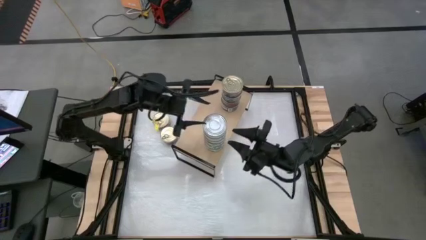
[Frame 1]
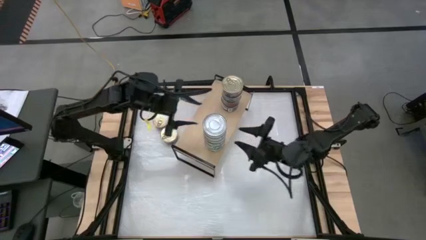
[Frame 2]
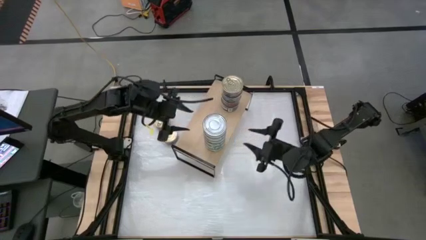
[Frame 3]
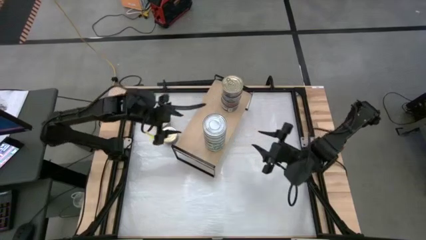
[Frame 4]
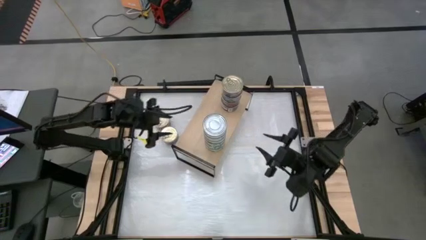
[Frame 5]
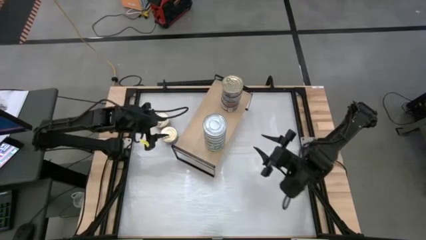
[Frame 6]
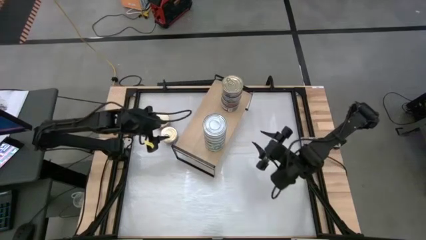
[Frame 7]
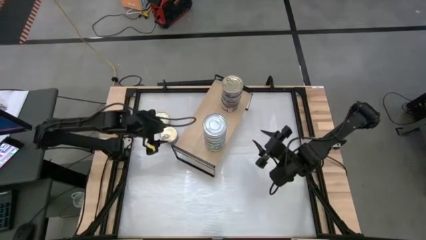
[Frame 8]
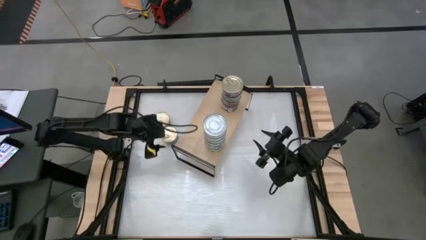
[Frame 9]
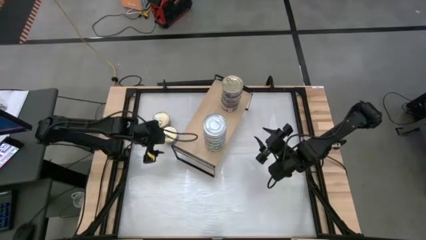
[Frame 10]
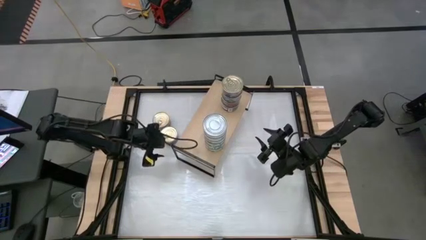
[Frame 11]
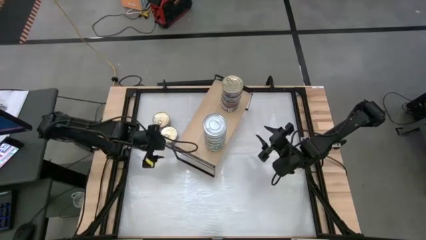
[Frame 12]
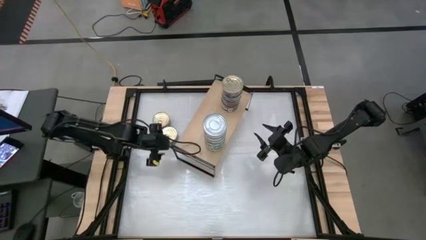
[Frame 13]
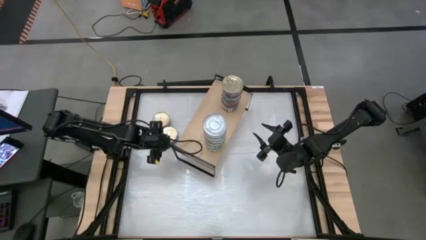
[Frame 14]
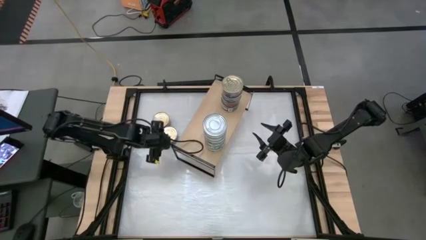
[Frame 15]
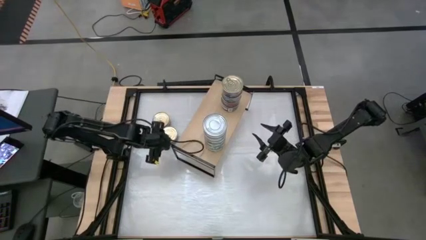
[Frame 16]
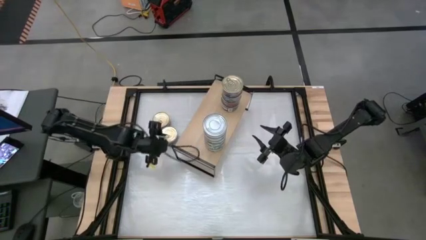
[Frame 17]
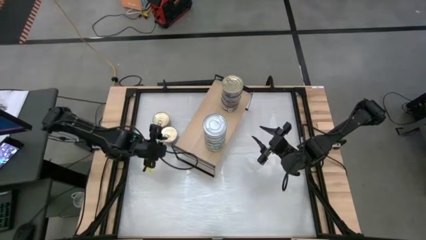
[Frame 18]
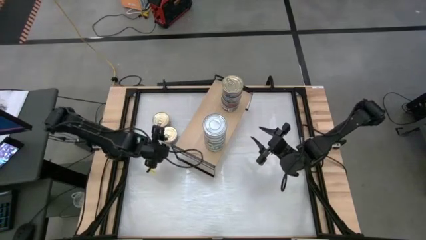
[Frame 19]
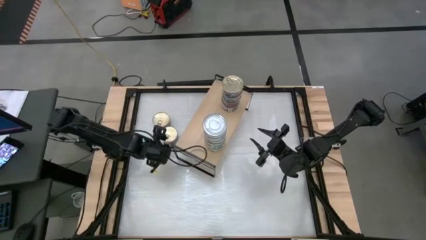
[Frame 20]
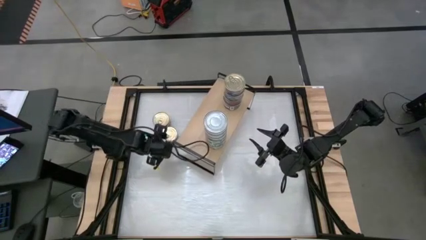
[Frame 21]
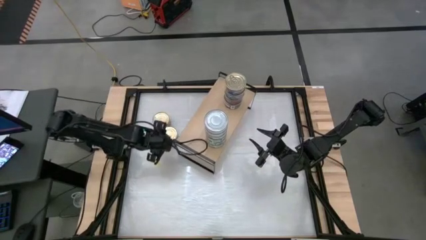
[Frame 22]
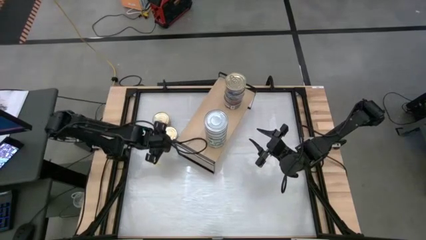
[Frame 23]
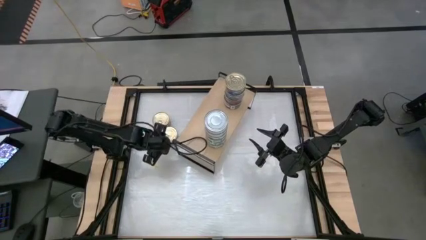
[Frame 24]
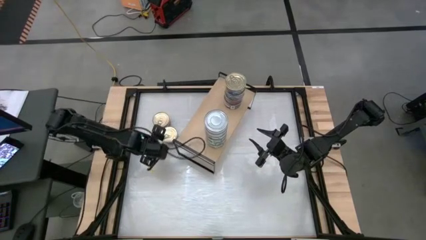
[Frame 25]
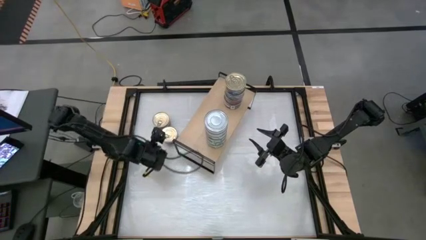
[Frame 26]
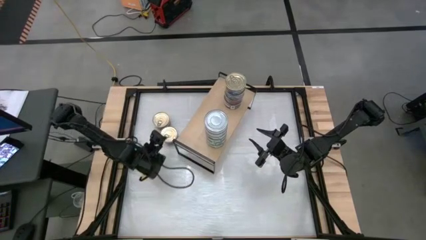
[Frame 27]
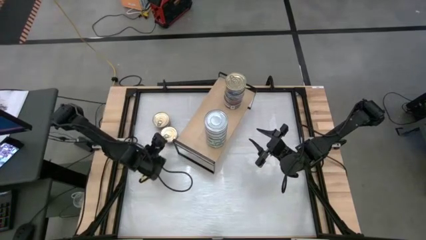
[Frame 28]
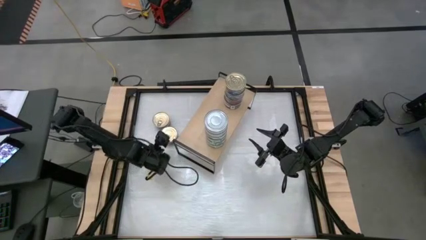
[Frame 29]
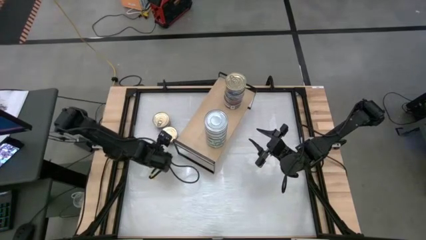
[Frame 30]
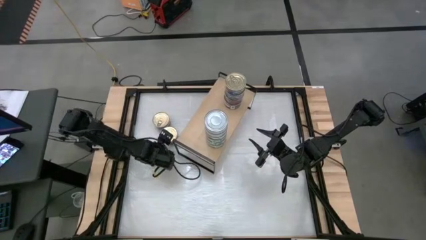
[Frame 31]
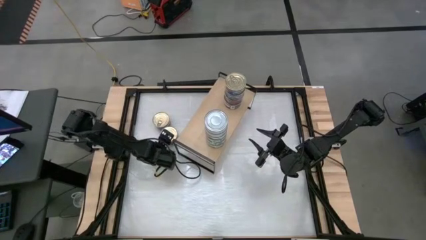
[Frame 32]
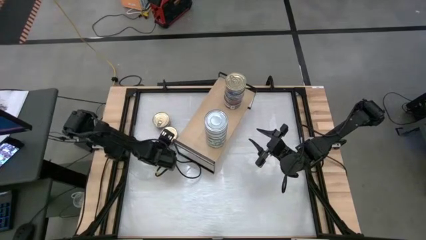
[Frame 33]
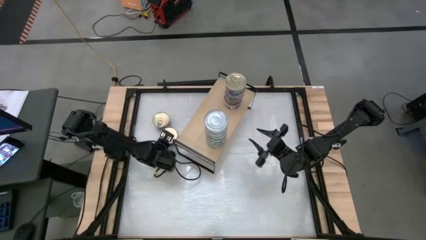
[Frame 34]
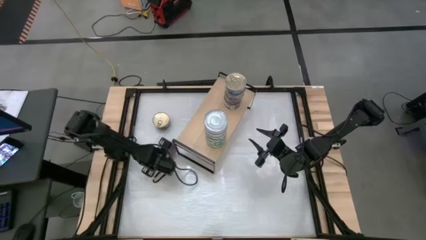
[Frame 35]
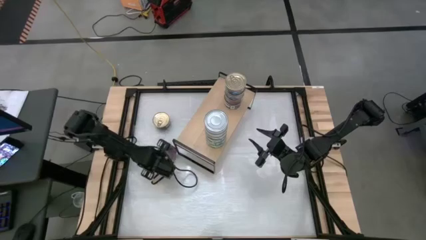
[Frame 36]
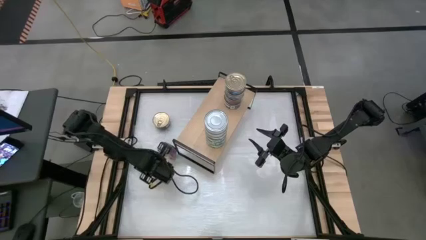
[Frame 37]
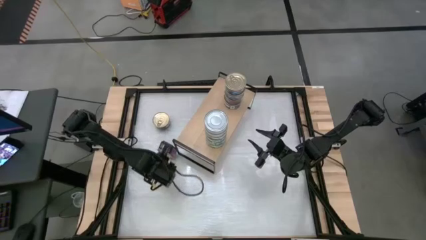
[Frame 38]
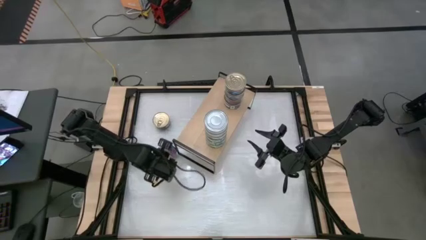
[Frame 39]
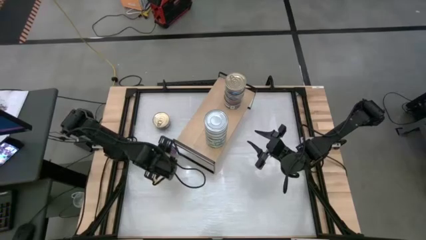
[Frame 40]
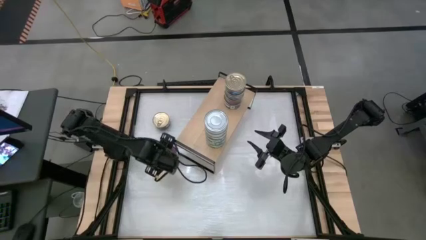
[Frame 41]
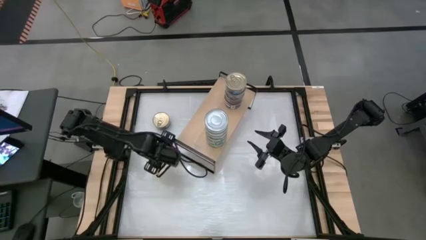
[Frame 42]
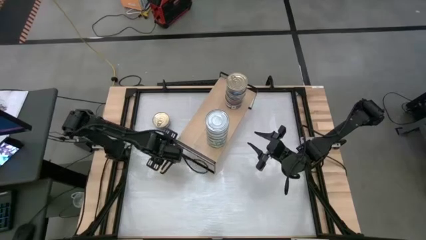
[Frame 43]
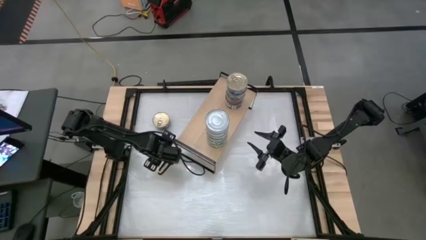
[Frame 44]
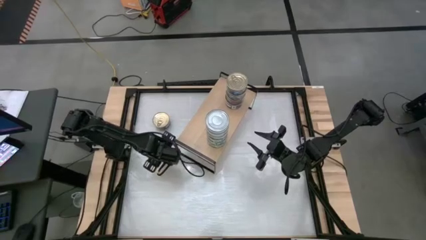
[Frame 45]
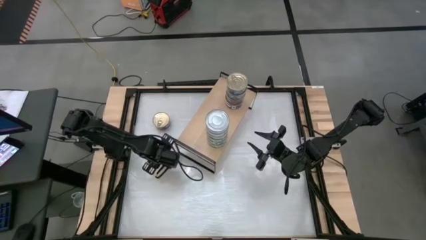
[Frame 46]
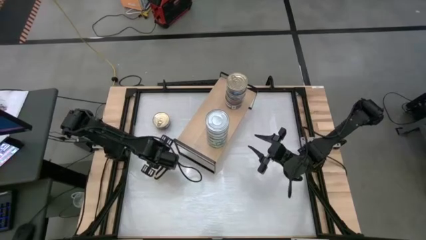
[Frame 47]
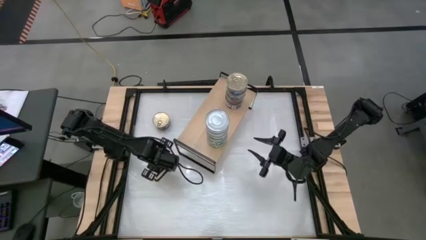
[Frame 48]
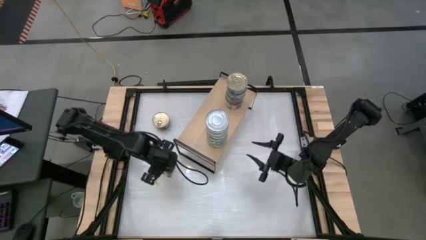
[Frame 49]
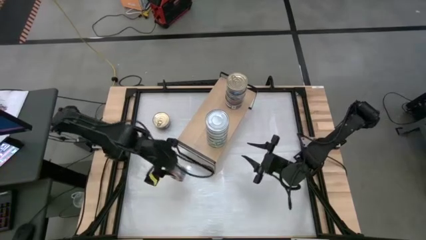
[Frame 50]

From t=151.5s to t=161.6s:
Task: Stack canned seafood by type on shelf
Stack the blue tuna can on top of the other blue tuna can
